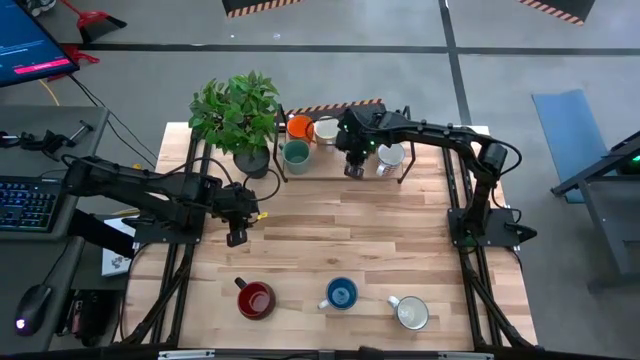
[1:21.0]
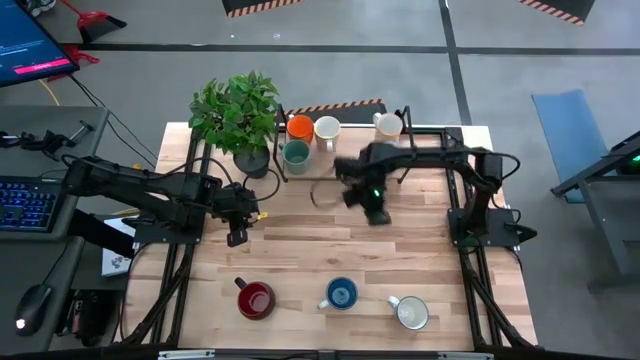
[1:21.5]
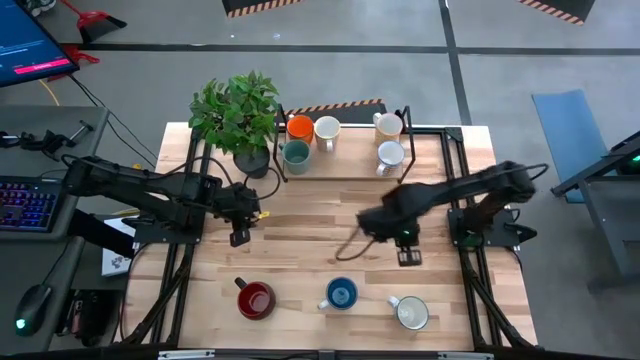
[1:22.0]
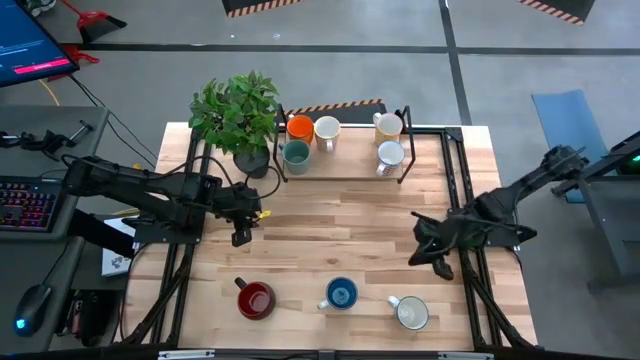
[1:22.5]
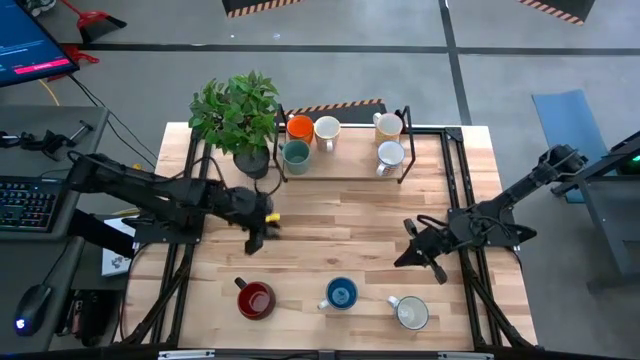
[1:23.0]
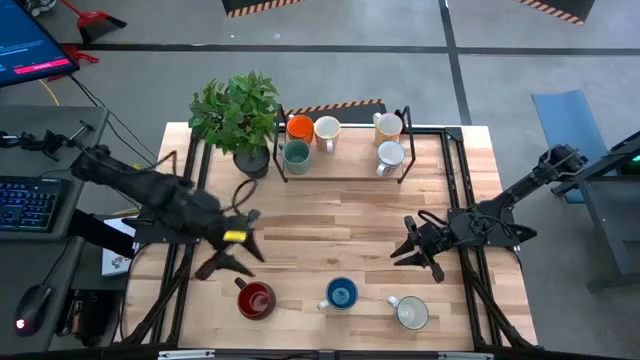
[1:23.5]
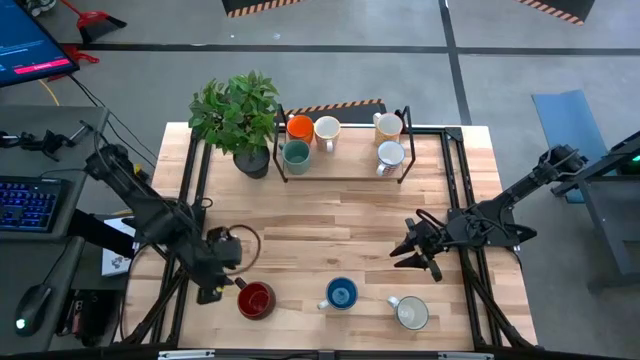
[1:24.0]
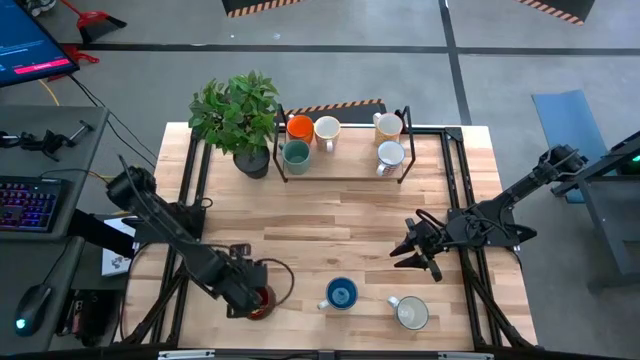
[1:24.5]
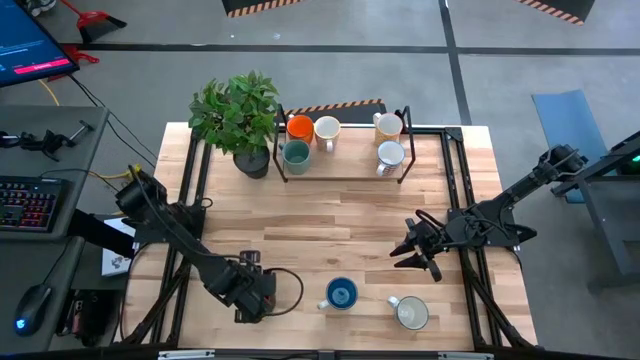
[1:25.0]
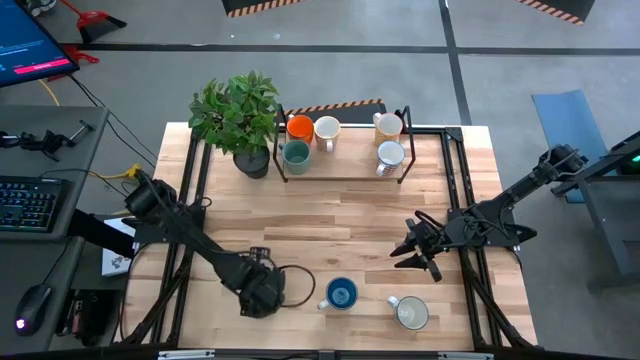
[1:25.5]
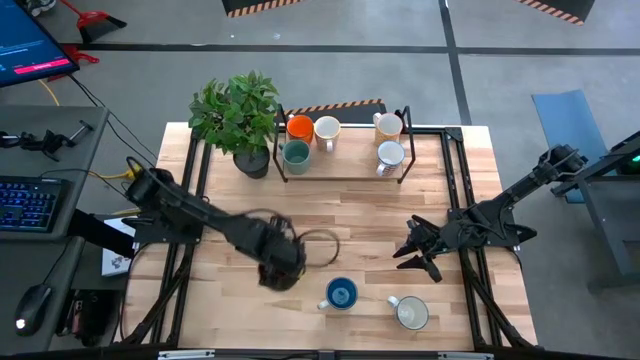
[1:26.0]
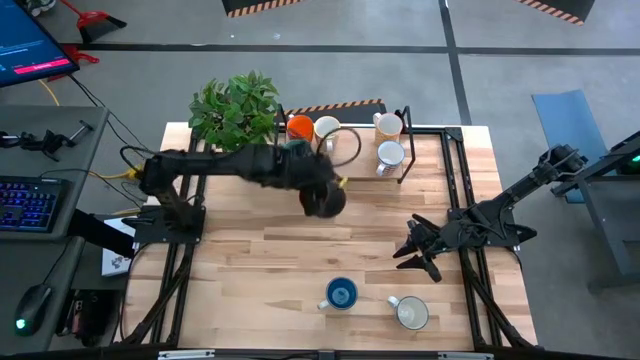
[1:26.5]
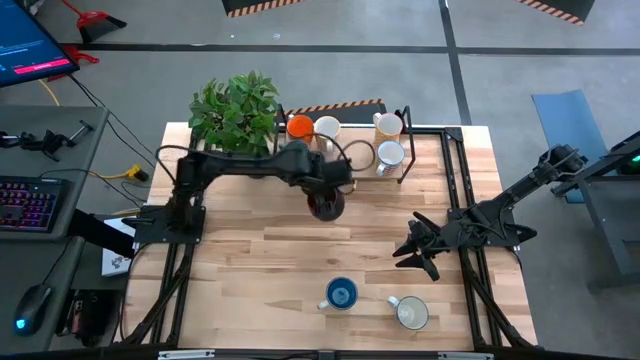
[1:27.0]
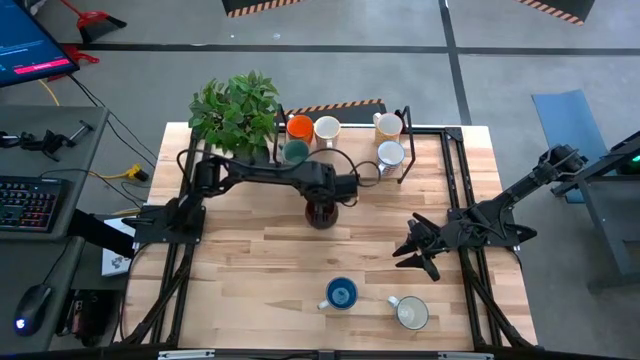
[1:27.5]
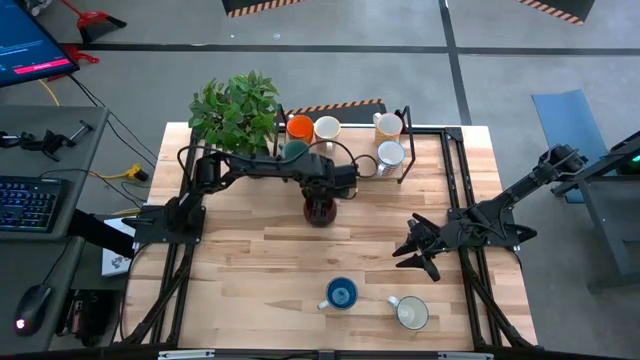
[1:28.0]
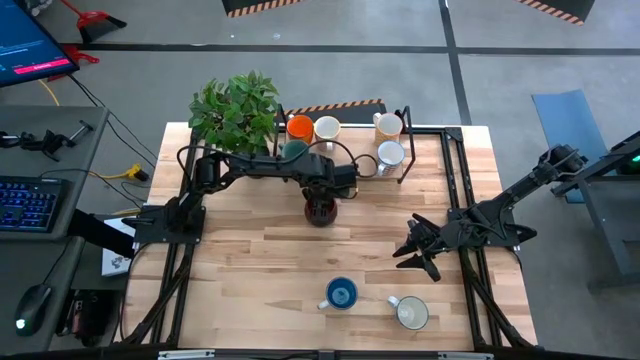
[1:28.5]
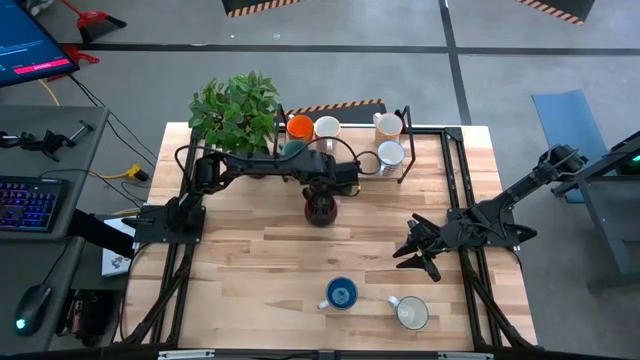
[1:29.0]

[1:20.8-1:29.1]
Task: Place coffee mugs
Move the black mug from bottom left to the center of the table

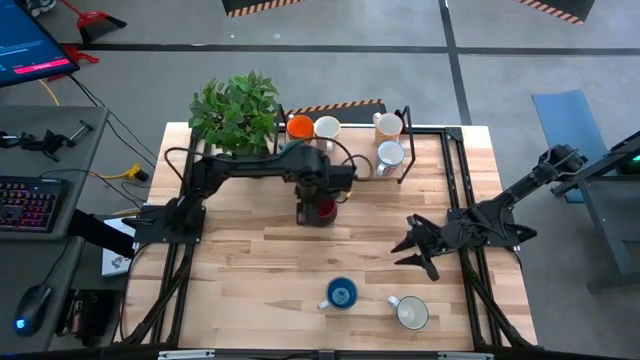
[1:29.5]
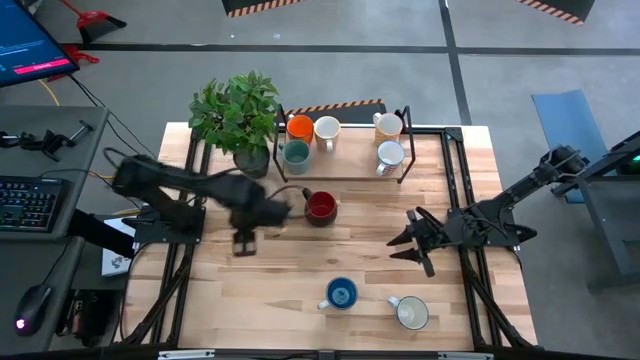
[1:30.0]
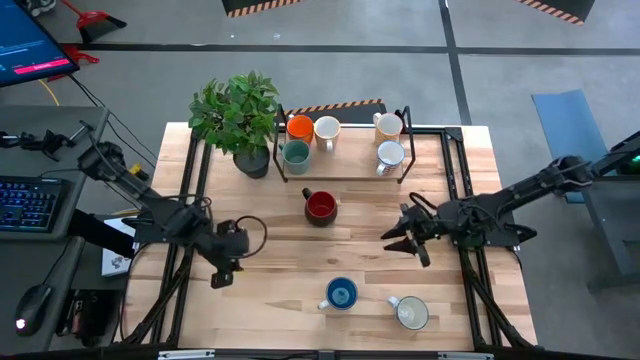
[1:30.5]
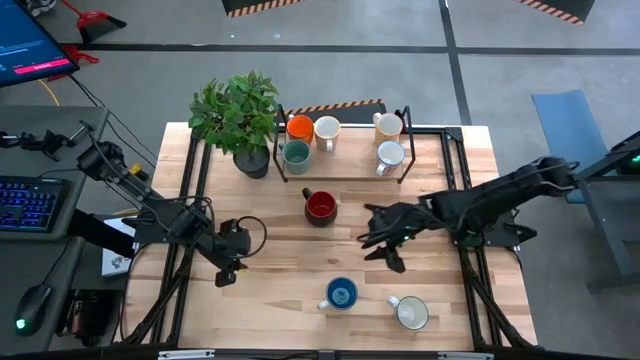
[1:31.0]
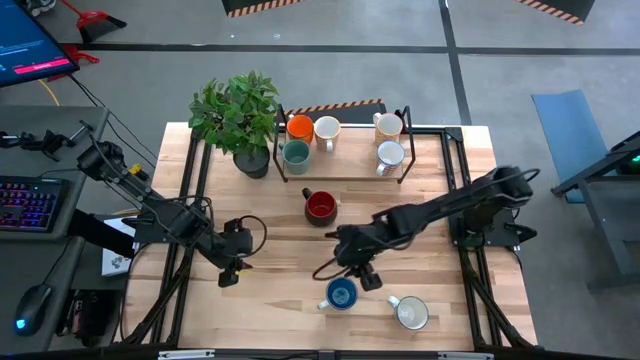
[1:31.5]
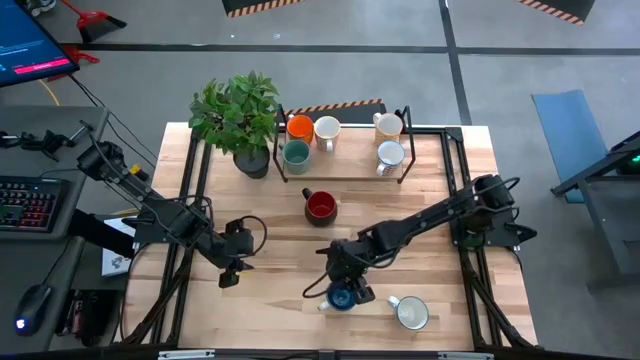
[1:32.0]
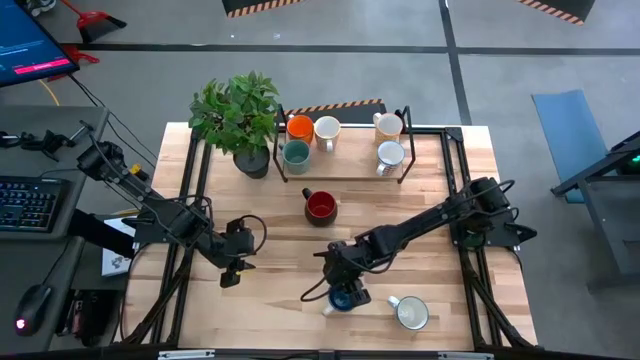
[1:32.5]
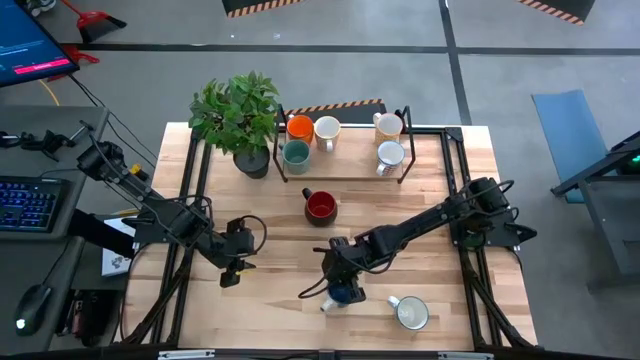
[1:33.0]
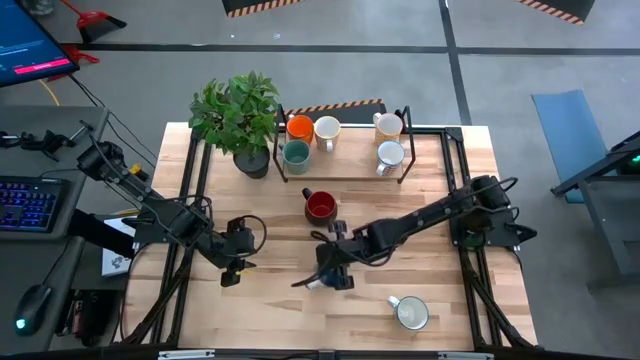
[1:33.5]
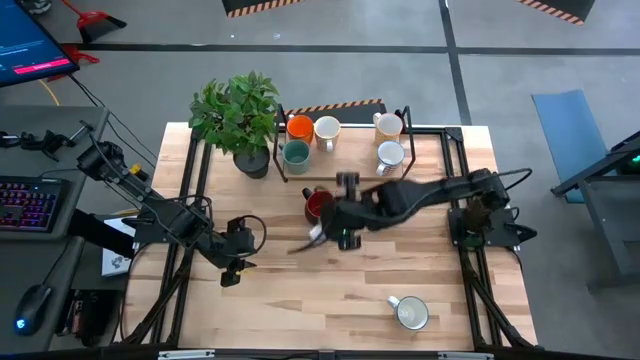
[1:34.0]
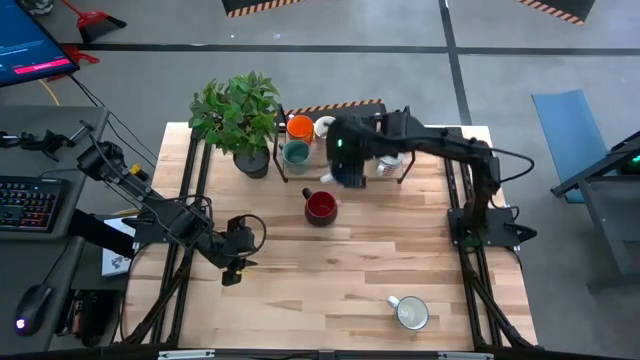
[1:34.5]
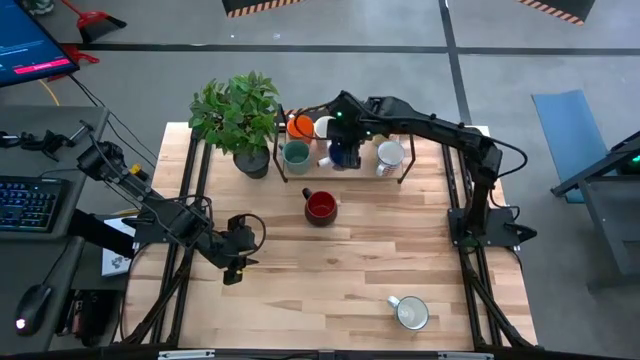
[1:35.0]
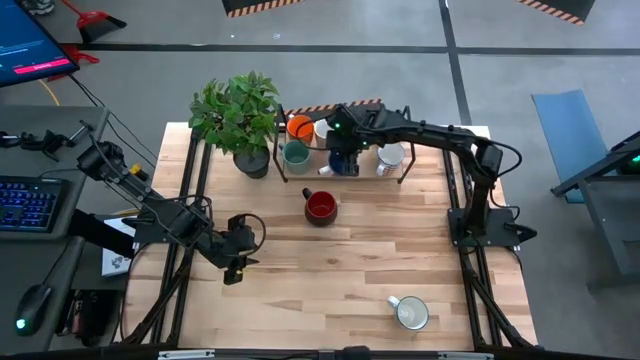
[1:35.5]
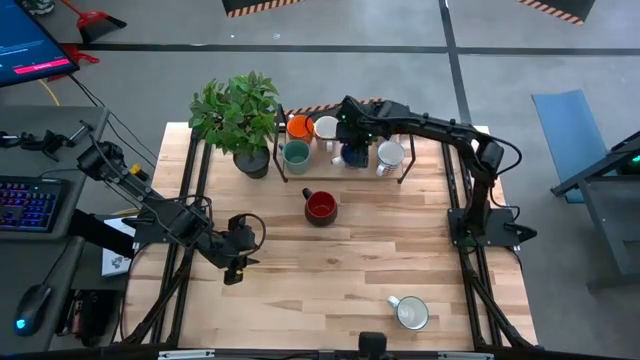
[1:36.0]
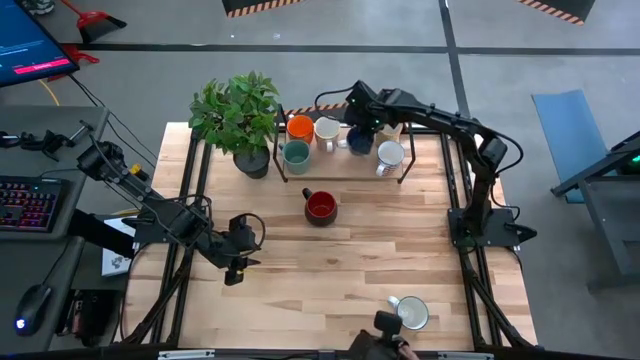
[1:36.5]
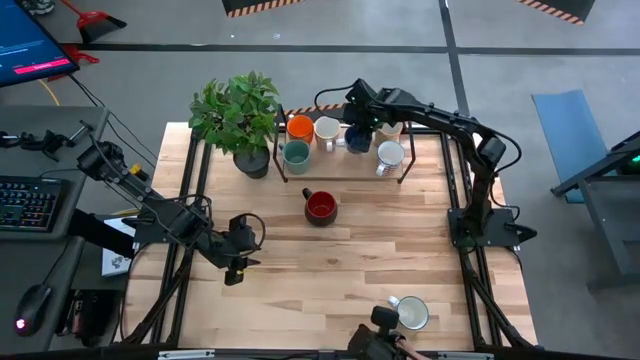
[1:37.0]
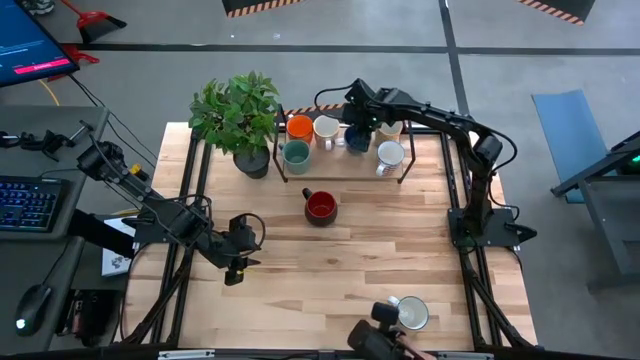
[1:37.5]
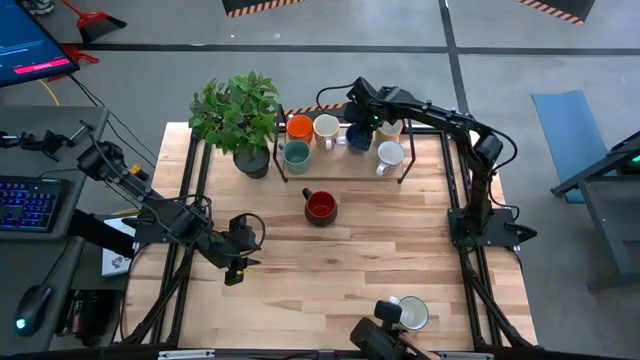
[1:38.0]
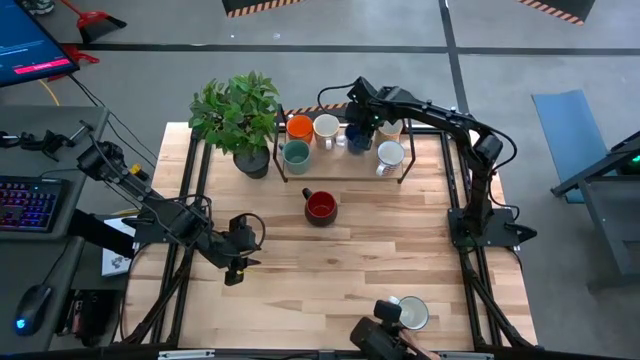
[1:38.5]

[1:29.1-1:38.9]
Put the blue mug on the shelf

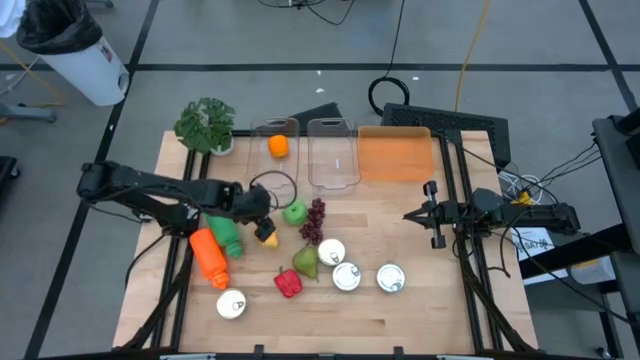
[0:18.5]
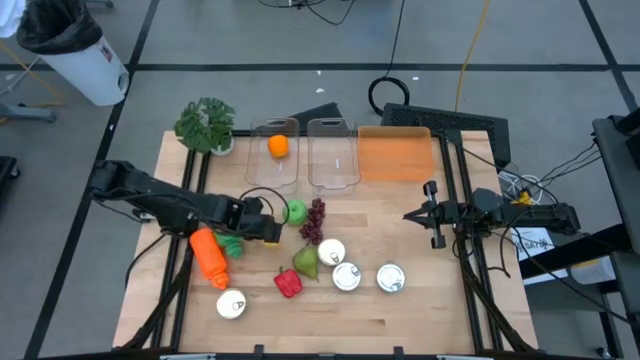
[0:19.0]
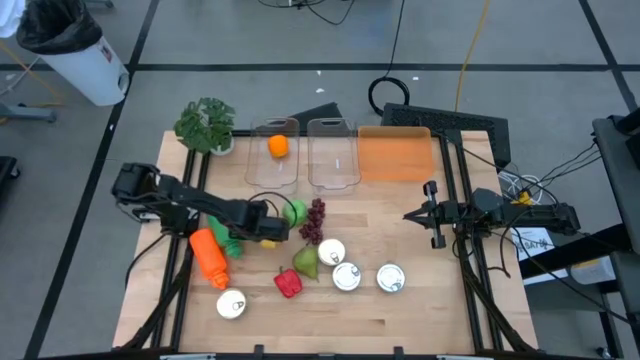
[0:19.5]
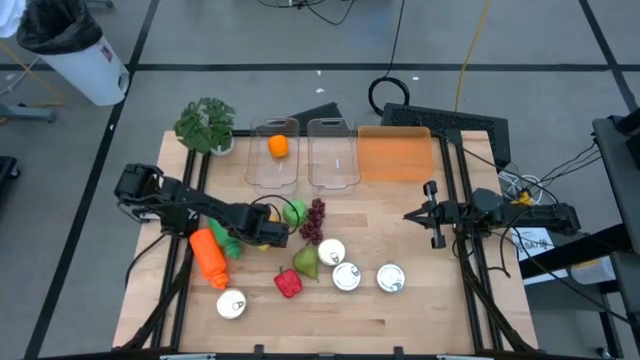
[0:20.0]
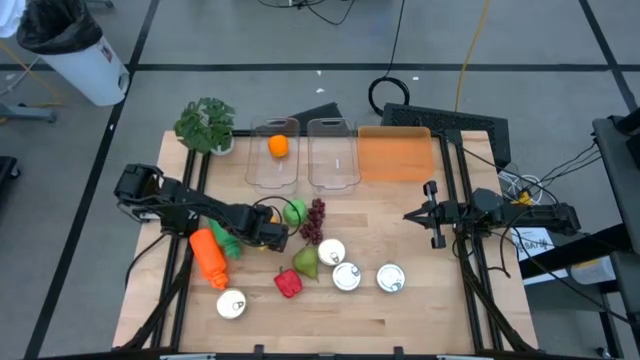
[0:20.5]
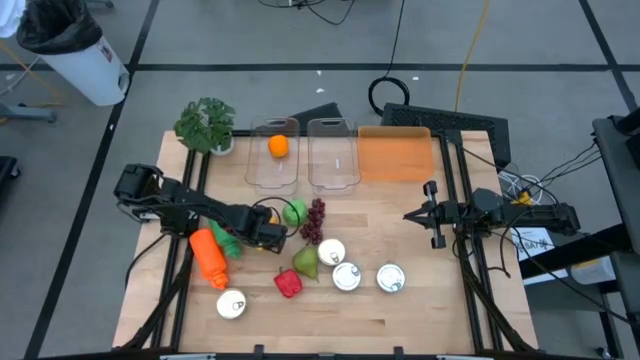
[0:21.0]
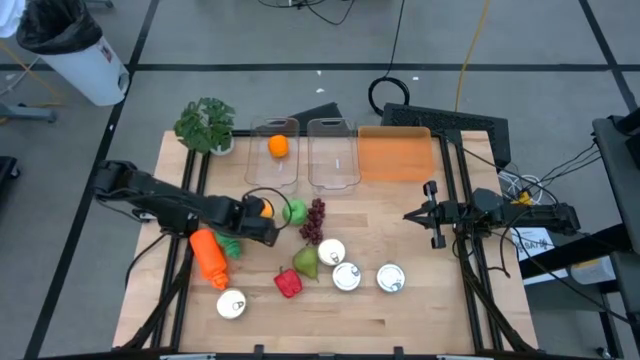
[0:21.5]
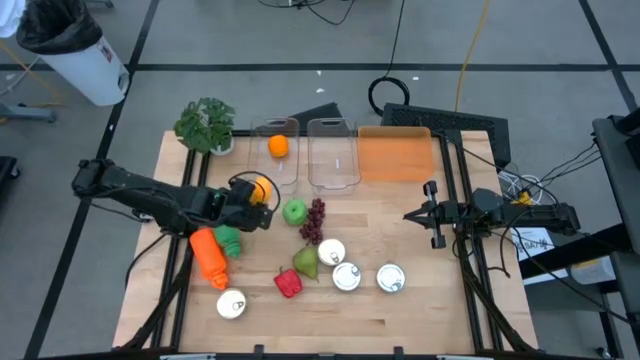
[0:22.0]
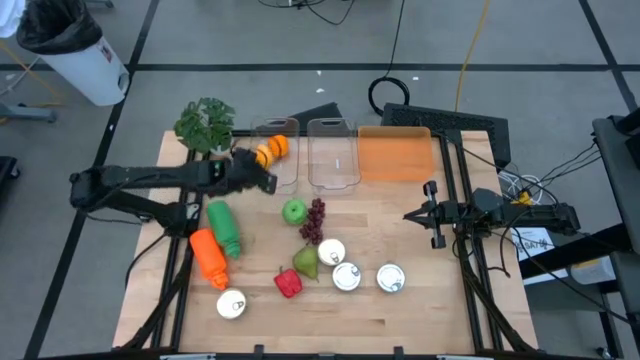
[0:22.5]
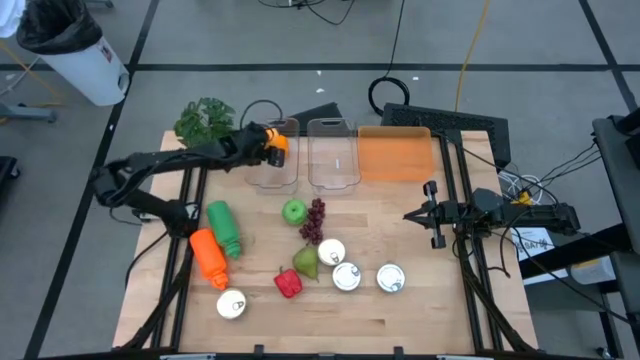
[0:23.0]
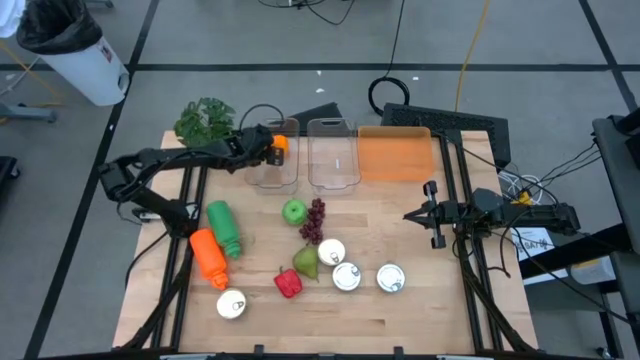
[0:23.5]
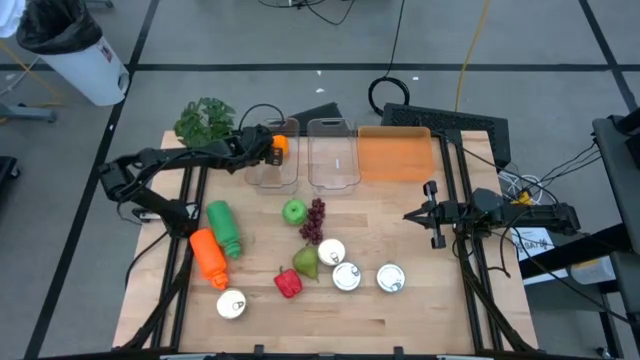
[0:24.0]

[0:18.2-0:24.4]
Task: Pick & Place Food Item
Put the yellow mango into the left transparent bin
